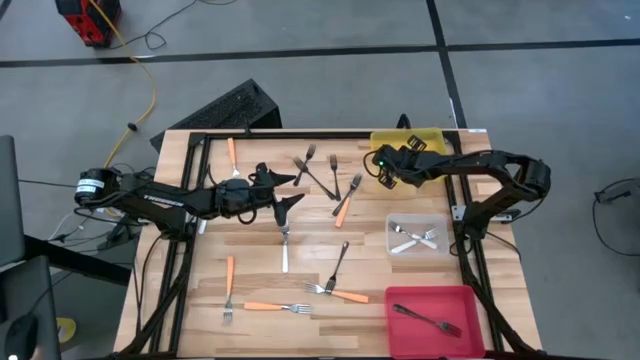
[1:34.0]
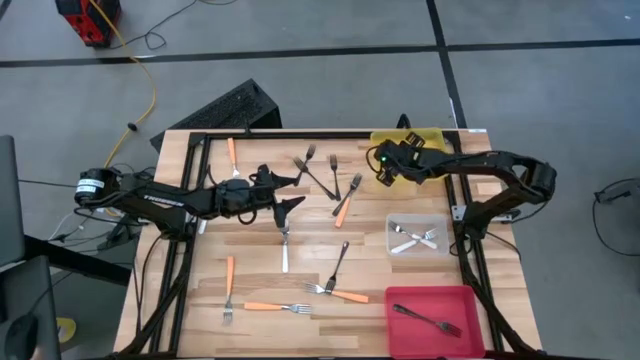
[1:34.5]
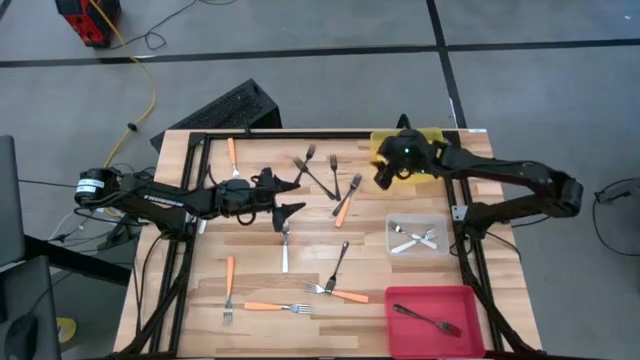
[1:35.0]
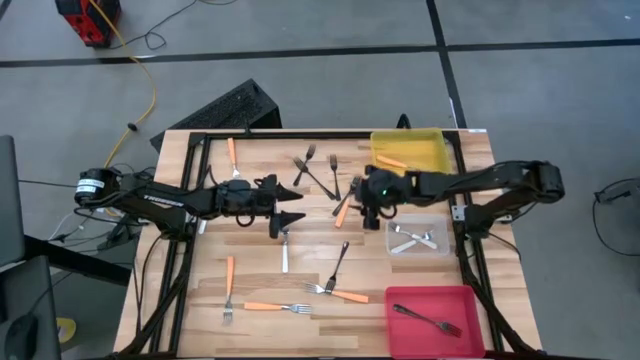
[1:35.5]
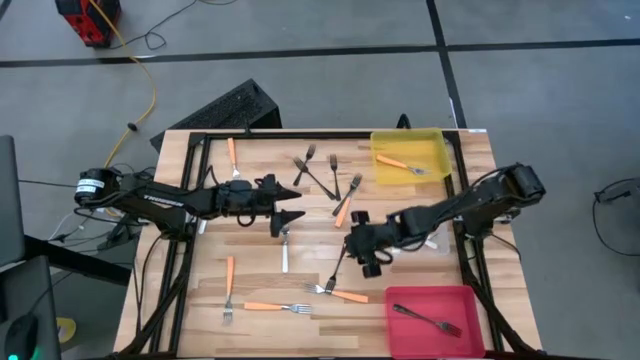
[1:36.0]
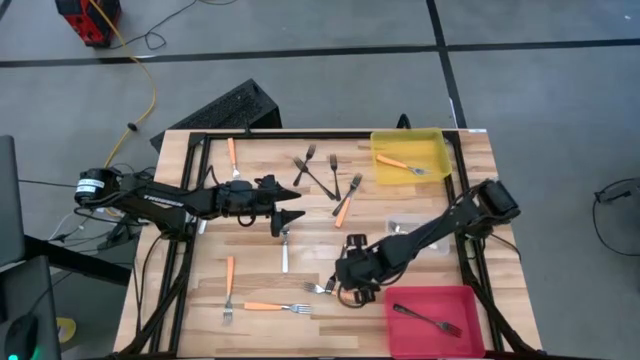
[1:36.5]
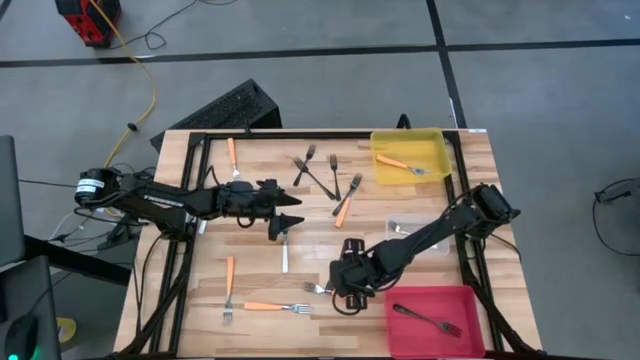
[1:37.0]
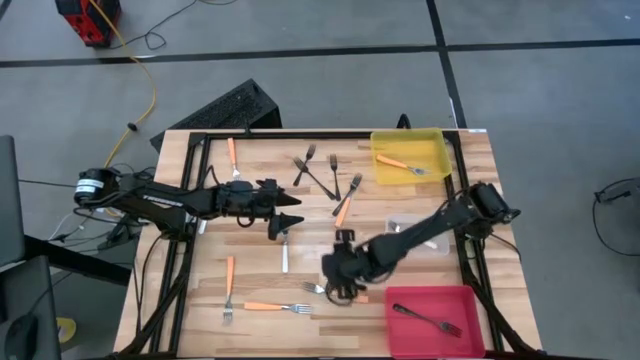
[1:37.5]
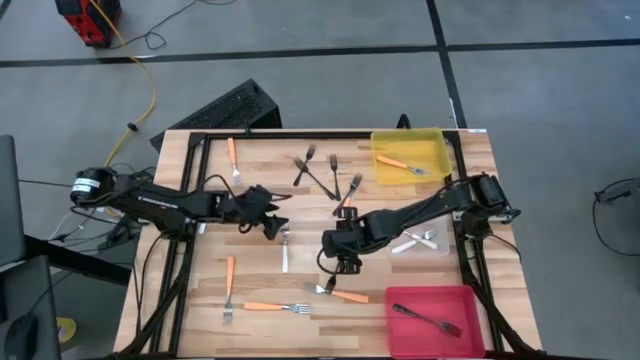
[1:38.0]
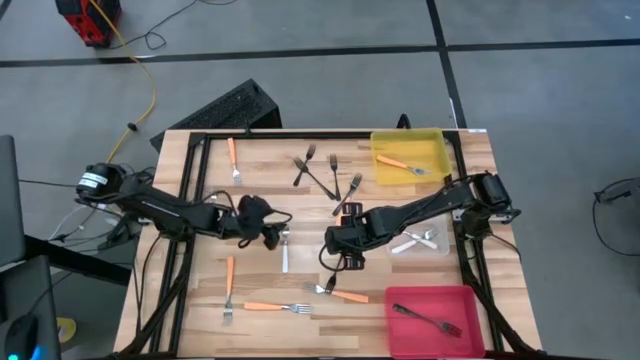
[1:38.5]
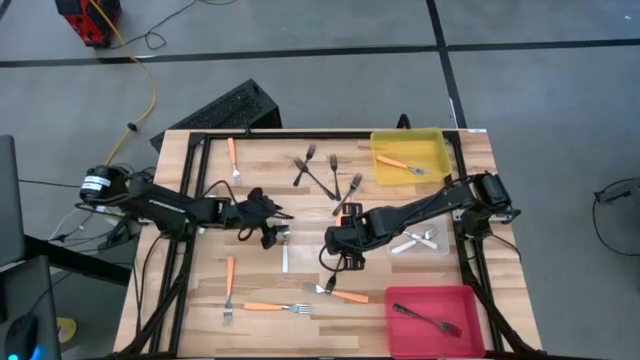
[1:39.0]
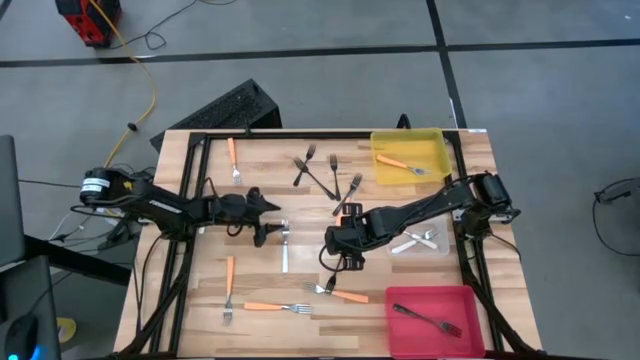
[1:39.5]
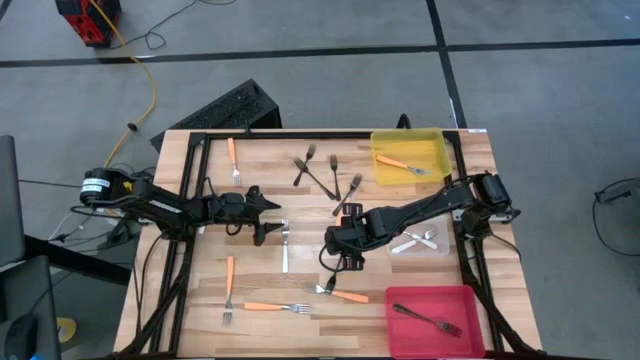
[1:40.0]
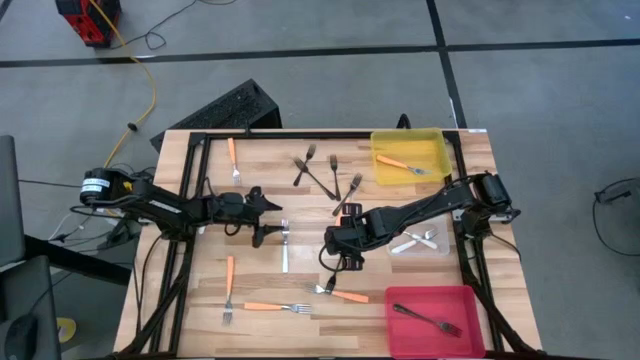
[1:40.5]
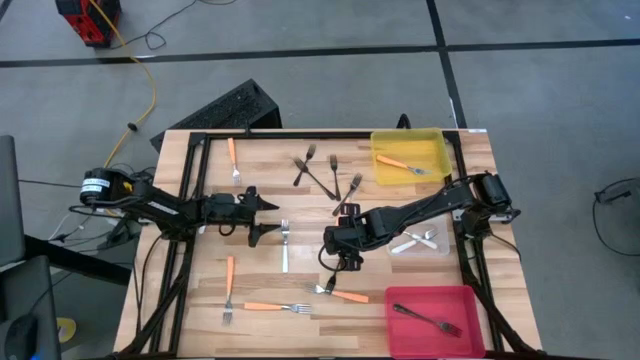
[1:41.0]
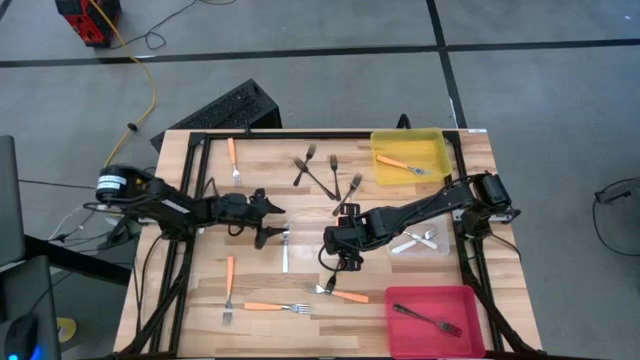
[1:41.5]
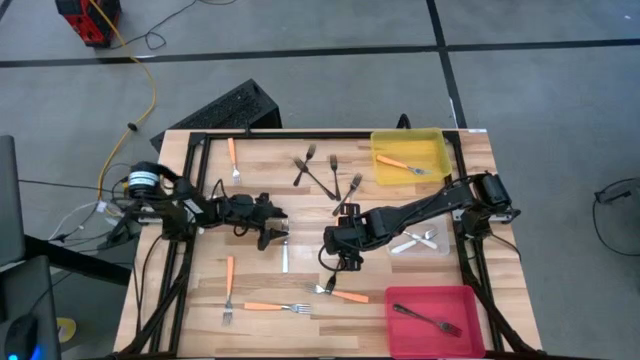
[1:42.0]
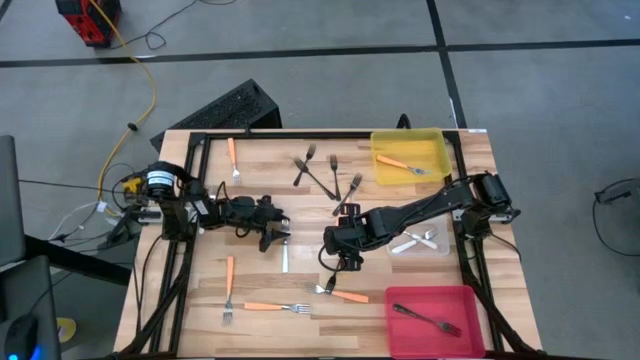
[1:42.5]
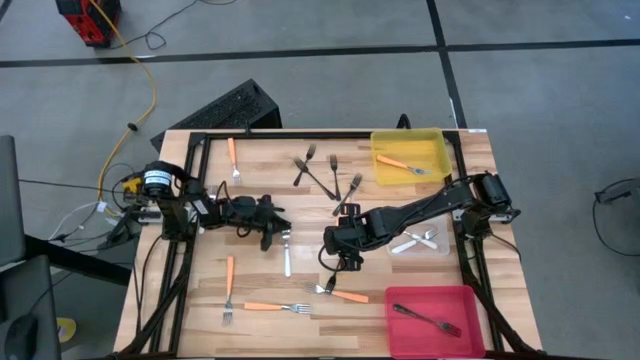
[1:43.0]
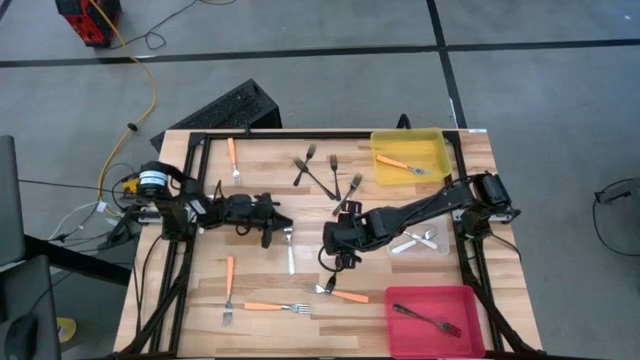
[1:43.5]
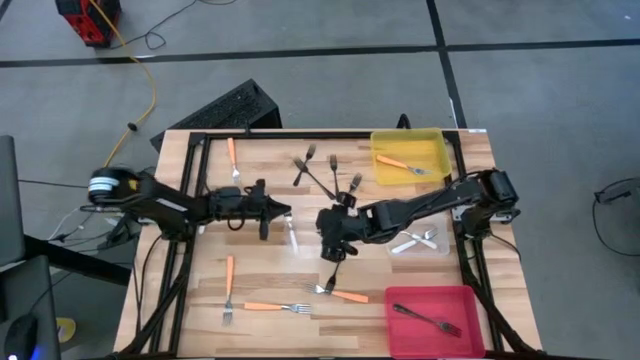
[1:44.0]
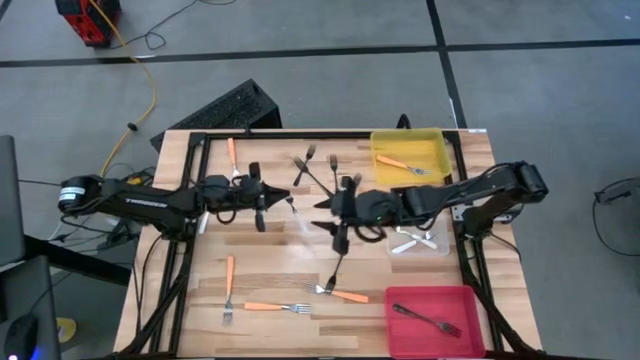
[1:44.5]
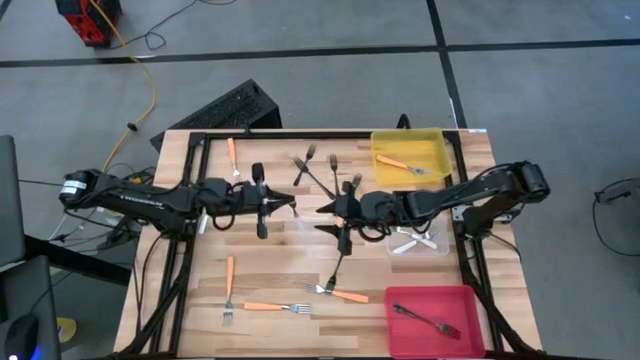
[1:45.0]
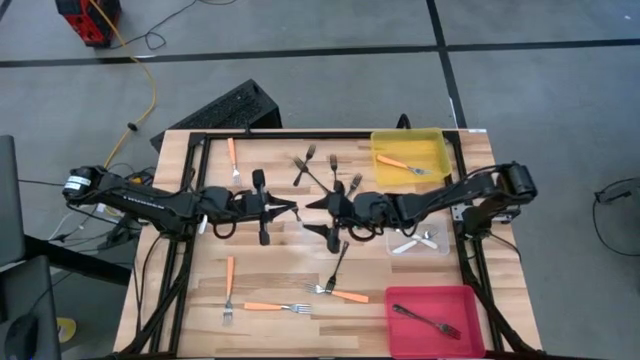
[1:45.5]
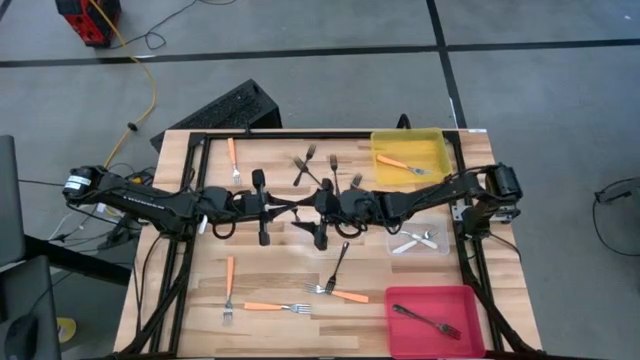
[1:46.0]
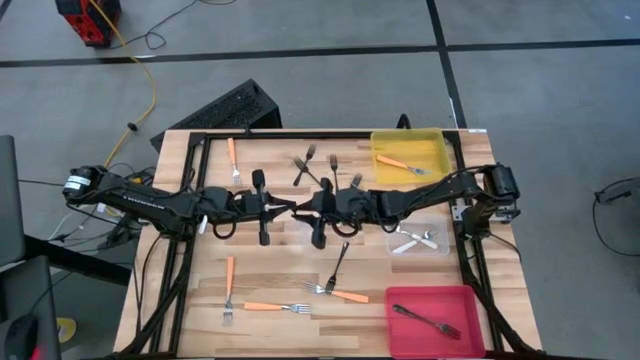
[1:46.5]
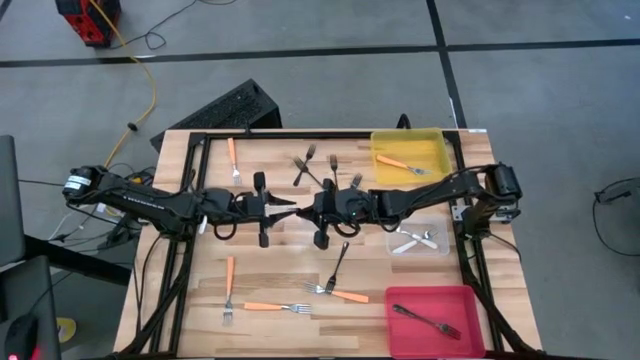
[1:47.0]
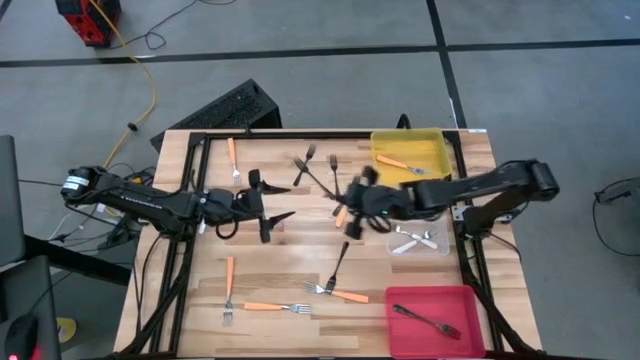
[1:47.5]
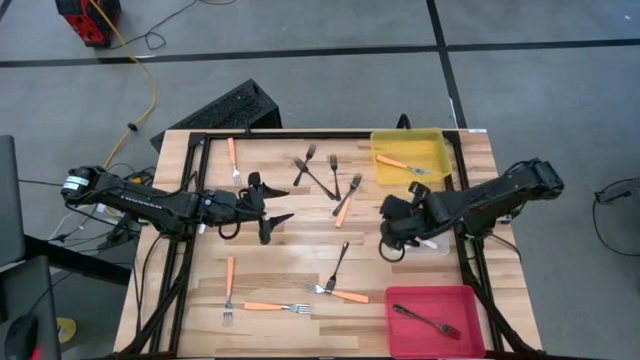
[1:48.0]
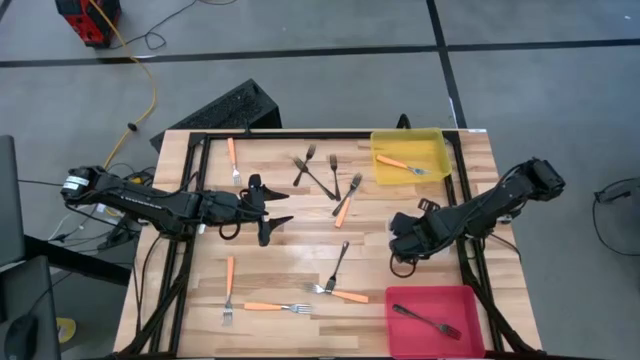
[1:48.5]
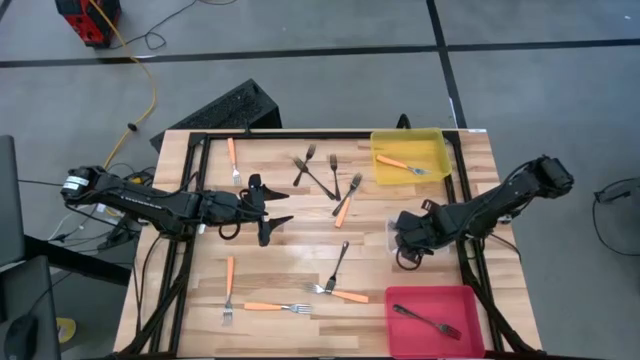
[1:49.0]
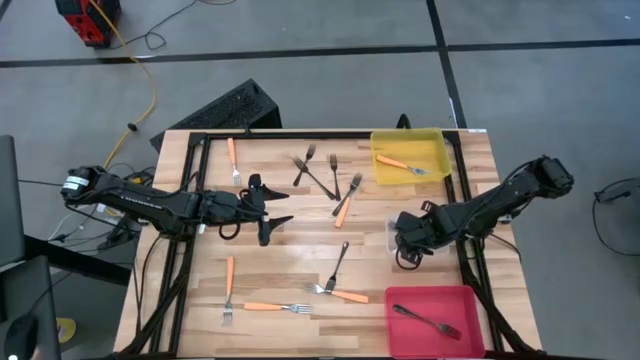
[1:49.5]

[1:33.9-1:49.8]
Task: Sort silverware by color (type)
Put the white fork into the transparent bin

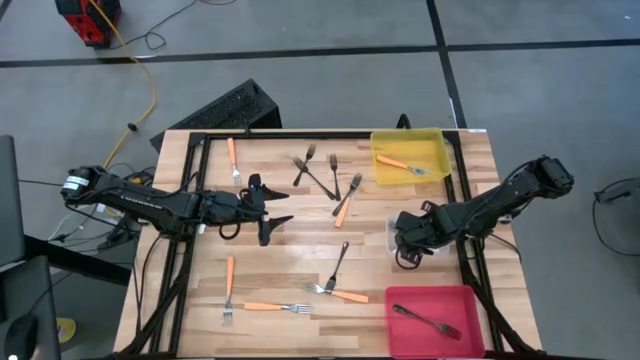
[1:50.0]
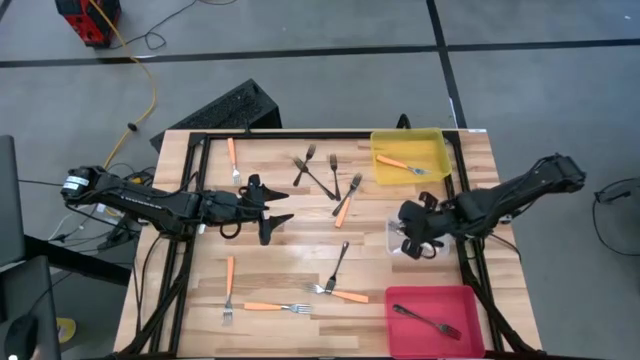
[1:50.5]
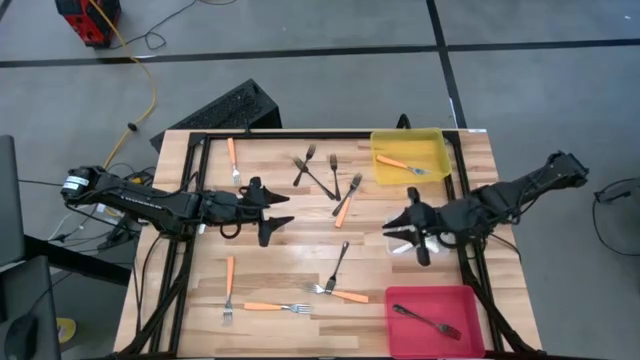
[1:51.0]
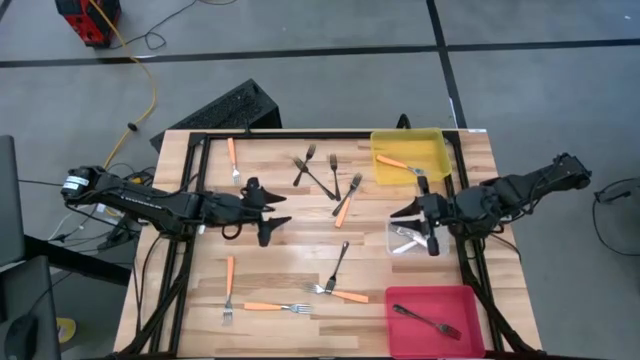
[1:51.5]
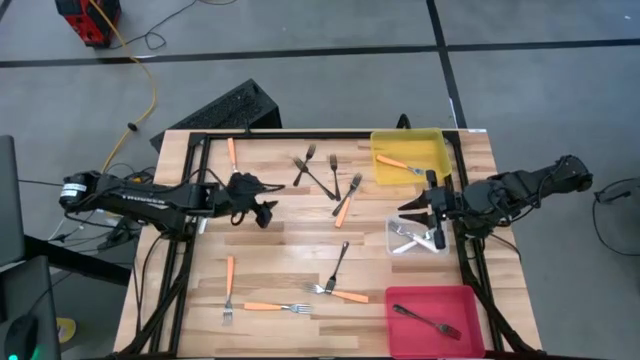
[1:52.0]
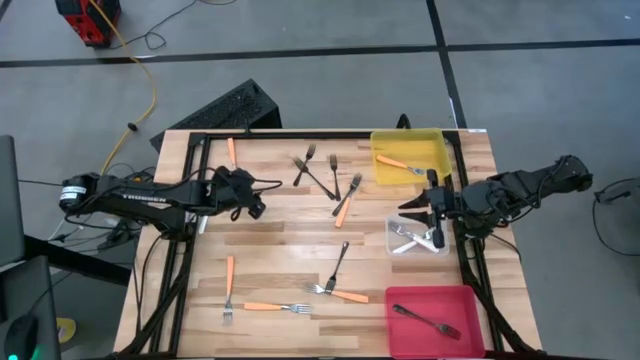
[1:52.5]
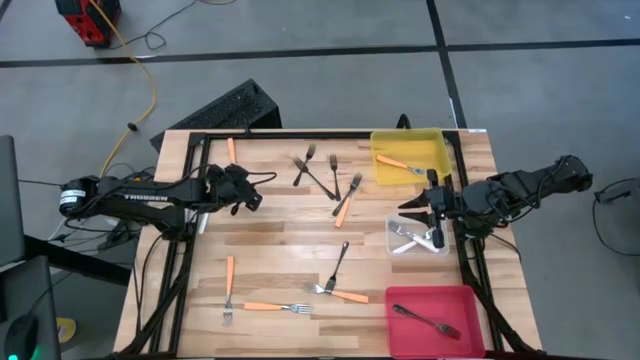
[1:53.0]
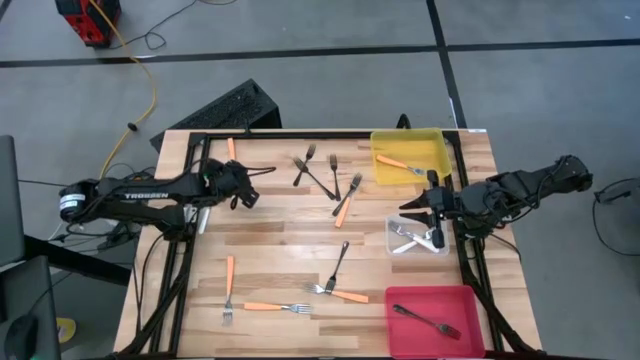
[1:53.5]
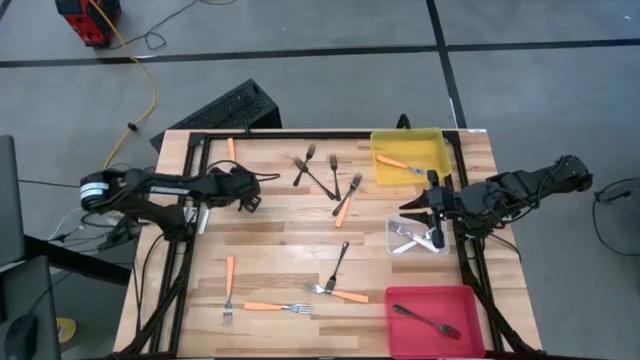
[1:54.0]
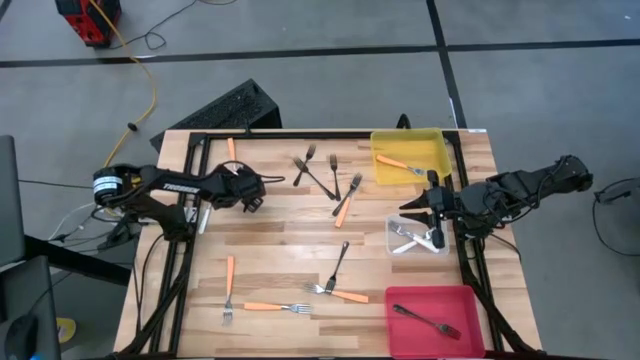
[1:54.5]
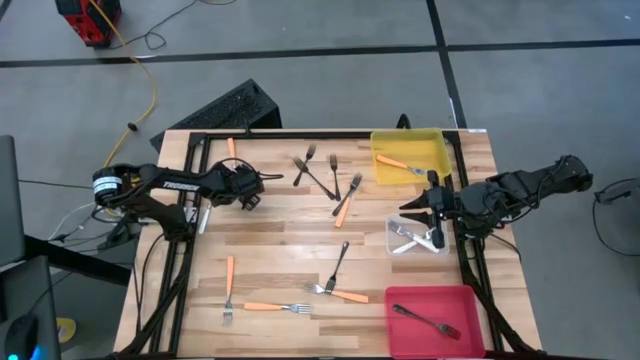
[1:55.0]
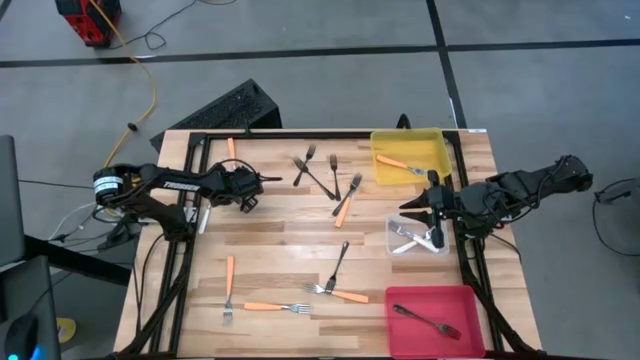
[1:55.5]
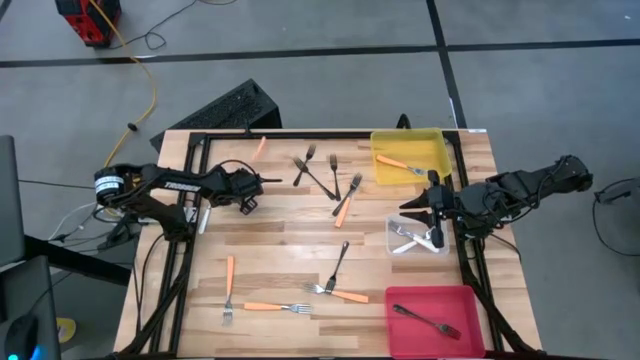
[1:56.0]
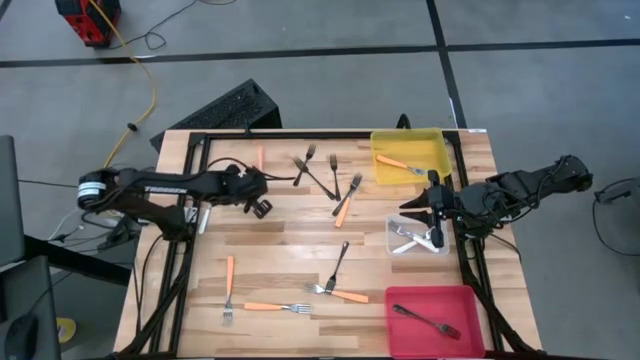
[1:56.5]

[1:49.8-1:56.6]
Put the orange fork into the yellow bin
